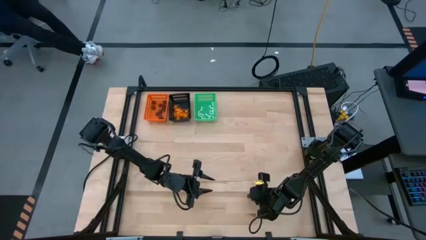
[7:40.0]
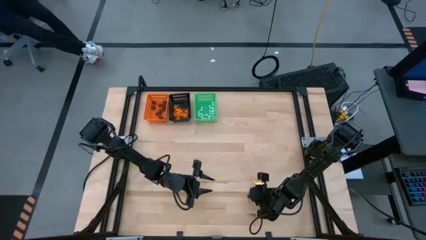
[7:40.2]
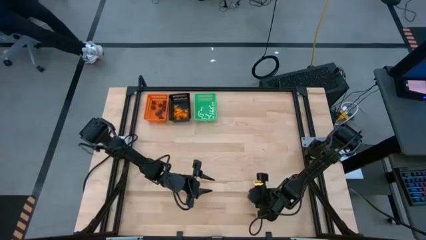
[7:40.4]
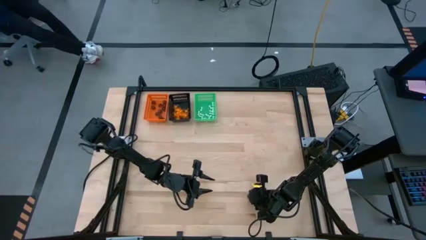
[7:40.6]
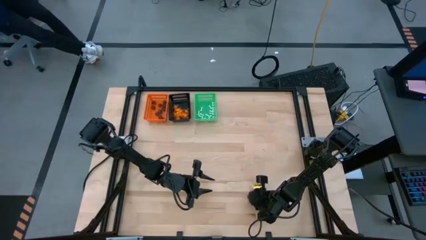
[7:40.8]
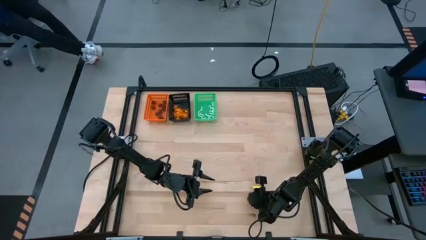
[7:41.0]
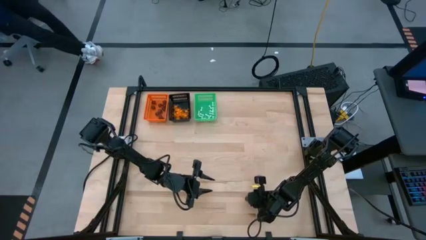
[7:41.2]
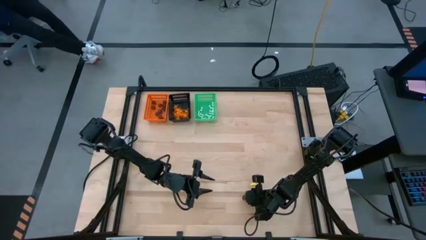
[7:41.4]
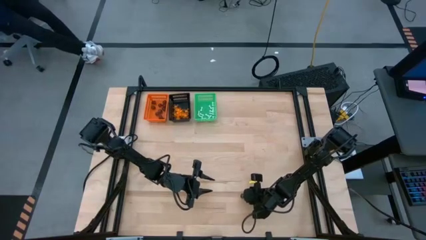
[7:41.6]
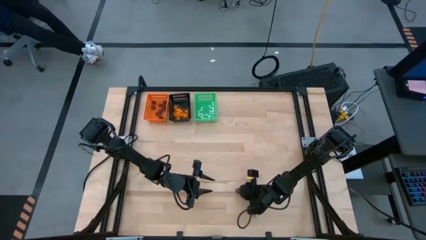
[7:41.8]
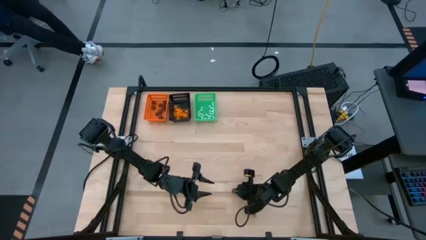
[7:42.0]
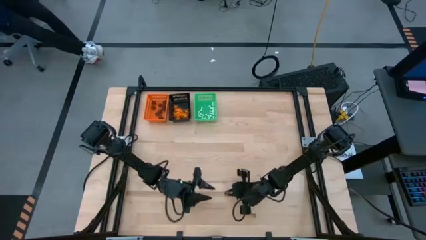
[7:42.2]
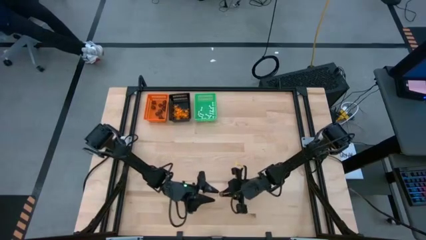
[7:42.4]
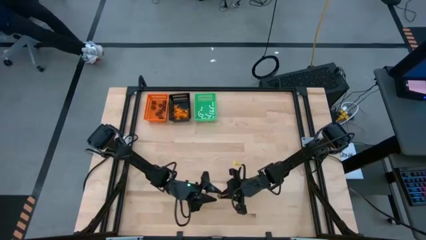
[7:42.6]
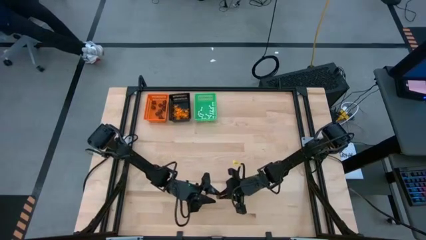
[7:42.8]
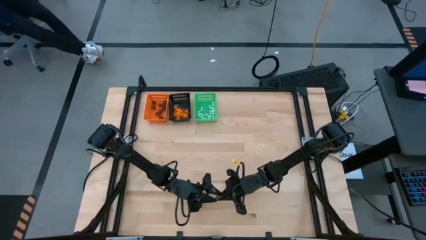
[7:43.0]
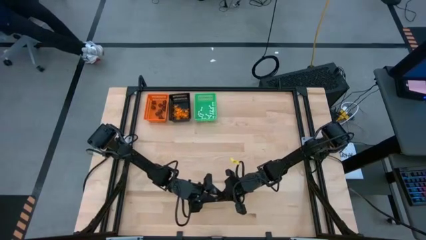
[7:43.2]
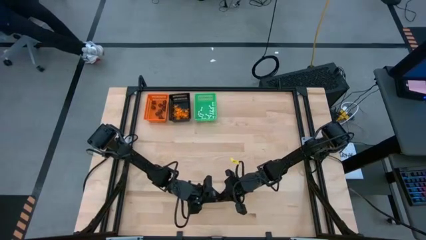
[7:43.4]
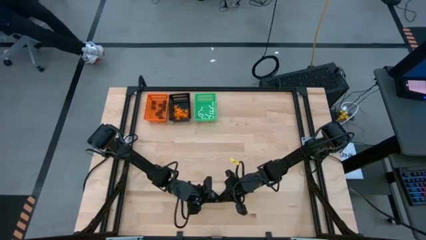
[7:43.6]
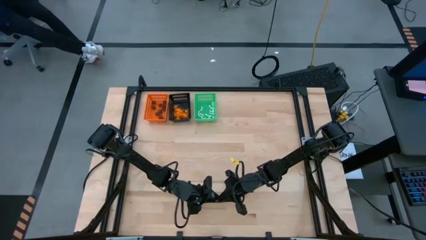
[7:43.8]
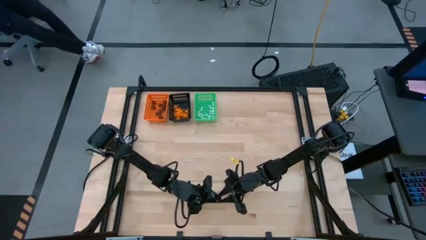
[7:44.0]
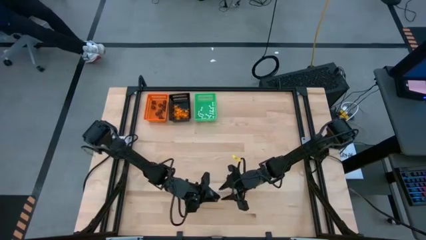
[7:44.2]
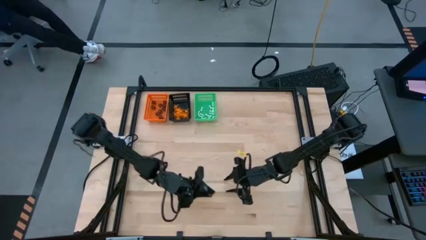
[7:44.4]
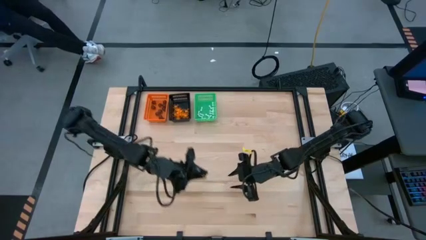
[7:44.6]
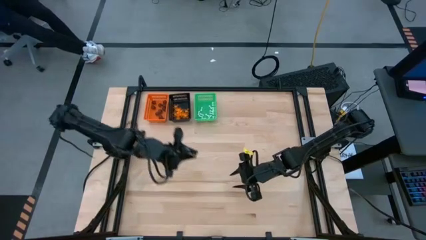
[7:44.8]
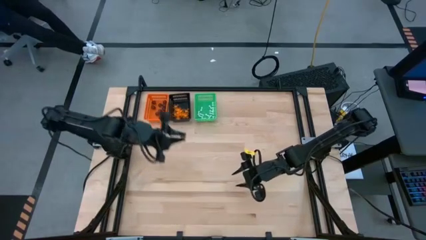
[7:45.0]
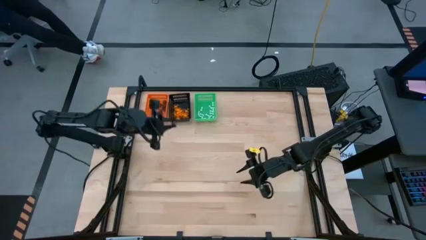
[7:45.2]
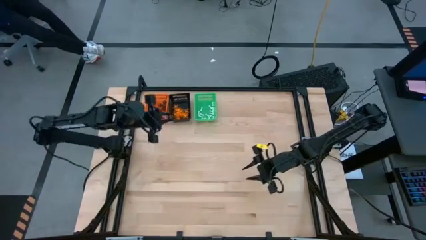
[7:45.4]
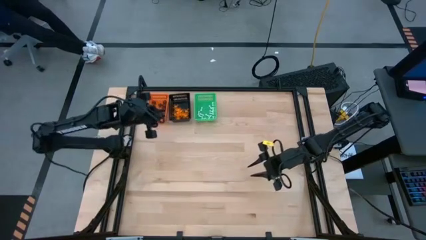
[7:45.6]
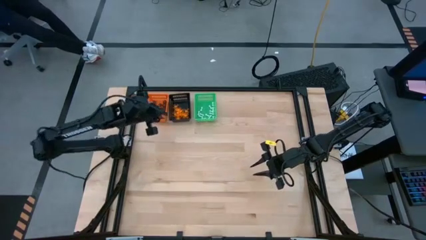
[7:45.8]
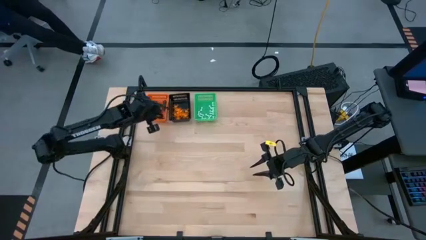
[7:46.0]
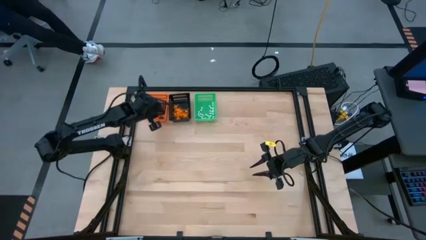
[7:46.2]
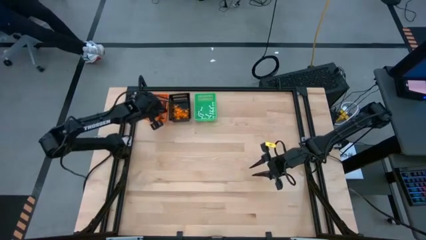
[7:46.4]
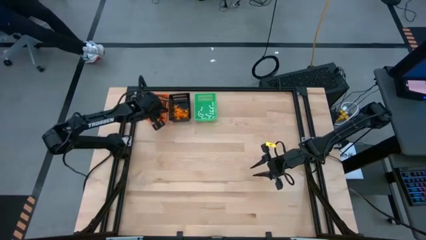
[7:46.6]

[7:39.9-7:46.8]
Task: Sort Halloween decoration
Put the black skull toy into the orange bin

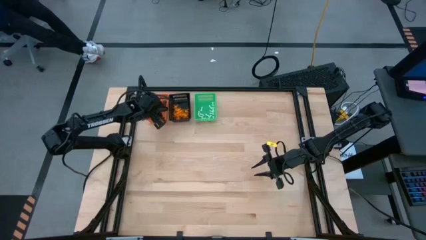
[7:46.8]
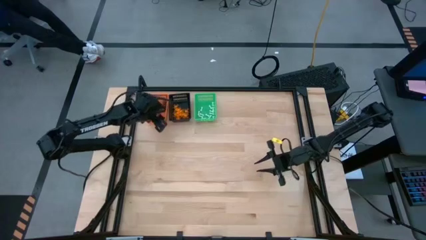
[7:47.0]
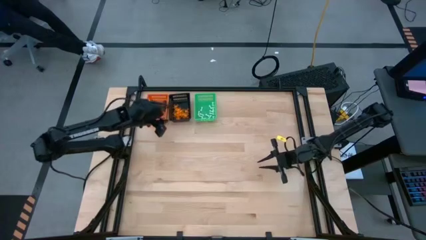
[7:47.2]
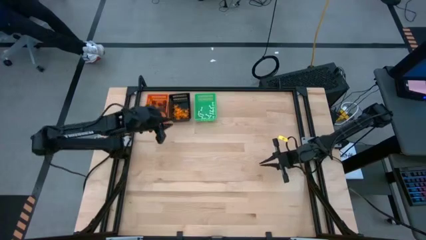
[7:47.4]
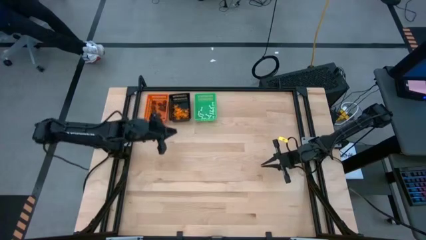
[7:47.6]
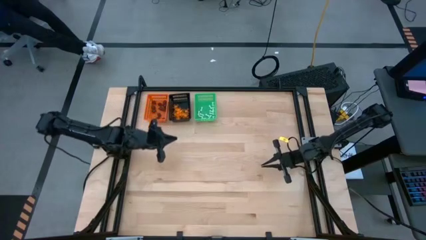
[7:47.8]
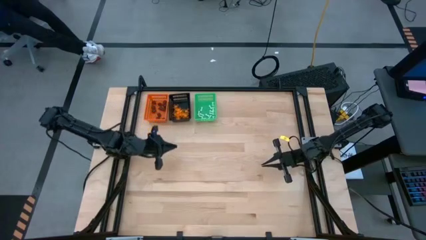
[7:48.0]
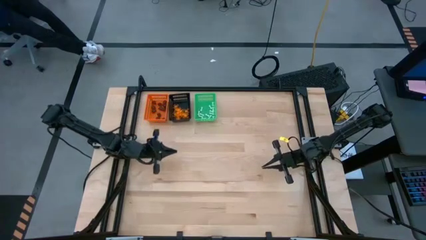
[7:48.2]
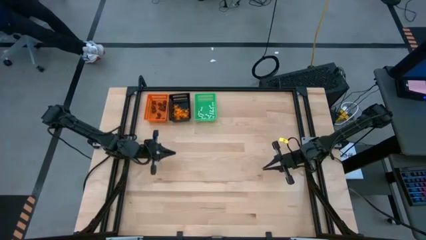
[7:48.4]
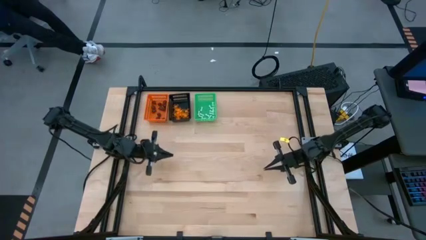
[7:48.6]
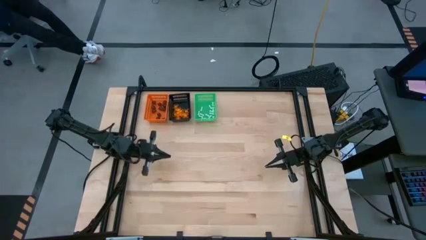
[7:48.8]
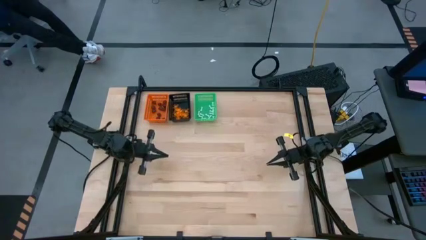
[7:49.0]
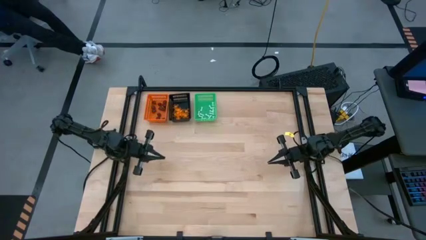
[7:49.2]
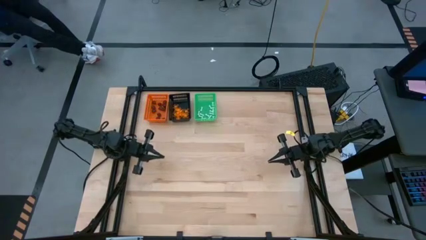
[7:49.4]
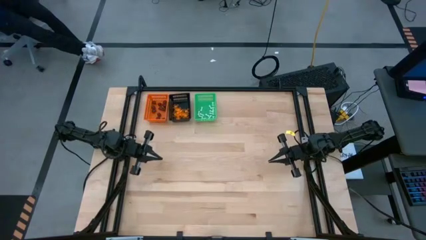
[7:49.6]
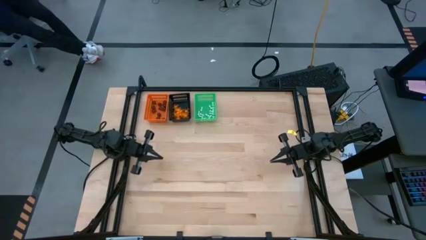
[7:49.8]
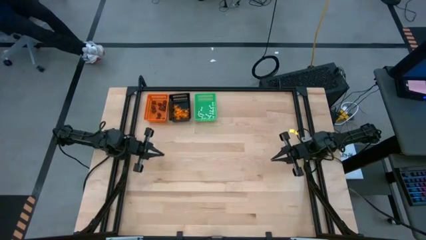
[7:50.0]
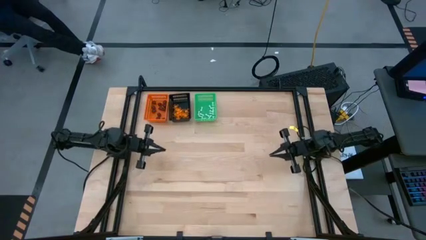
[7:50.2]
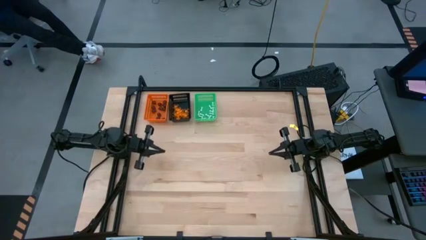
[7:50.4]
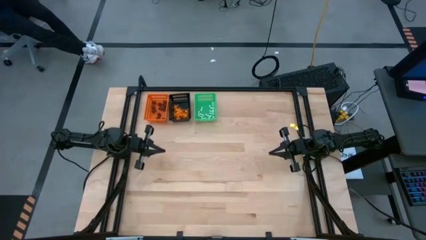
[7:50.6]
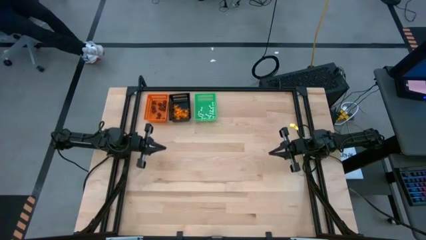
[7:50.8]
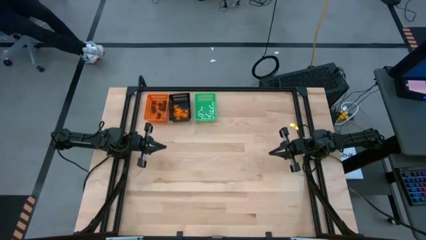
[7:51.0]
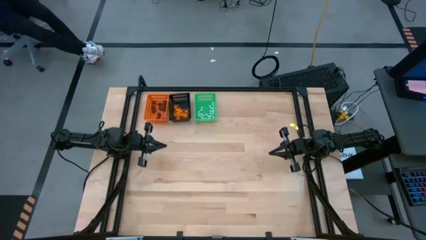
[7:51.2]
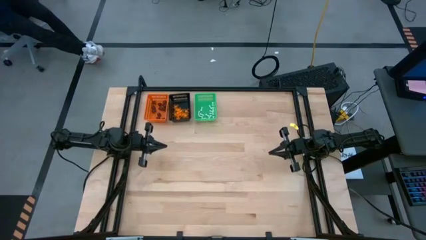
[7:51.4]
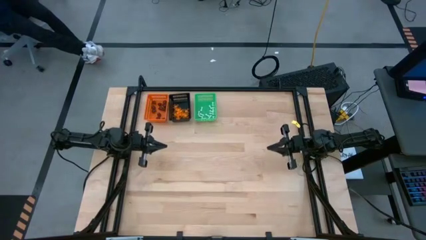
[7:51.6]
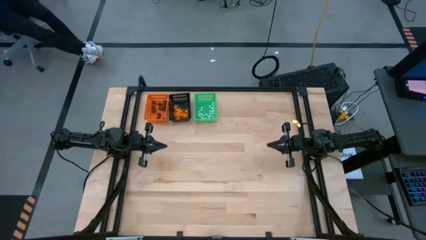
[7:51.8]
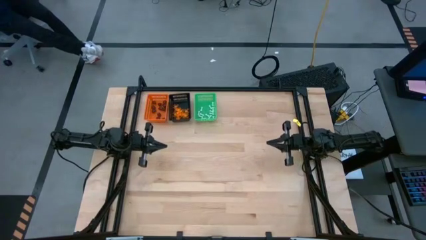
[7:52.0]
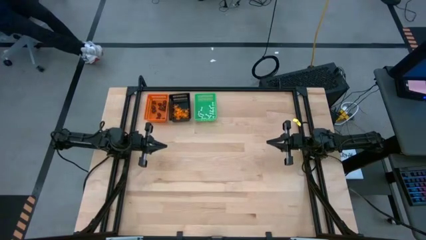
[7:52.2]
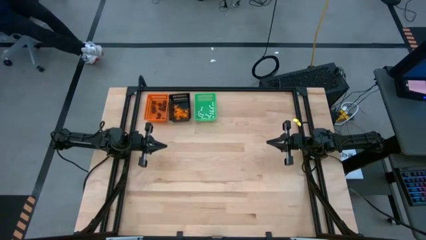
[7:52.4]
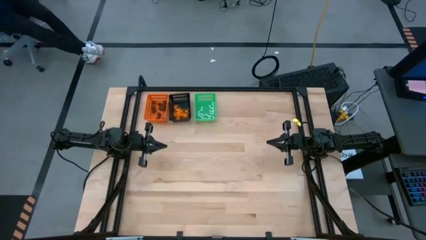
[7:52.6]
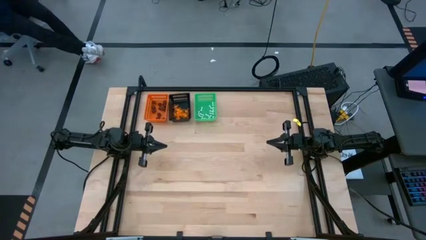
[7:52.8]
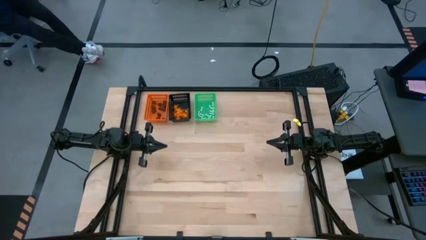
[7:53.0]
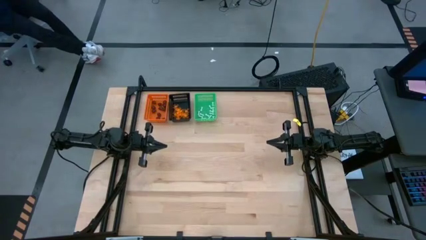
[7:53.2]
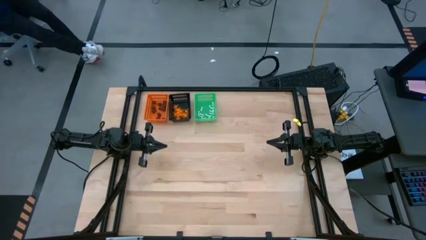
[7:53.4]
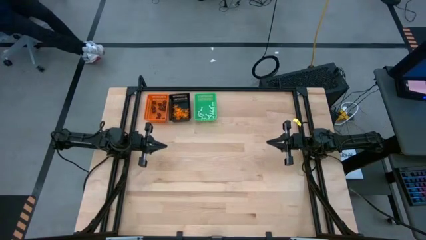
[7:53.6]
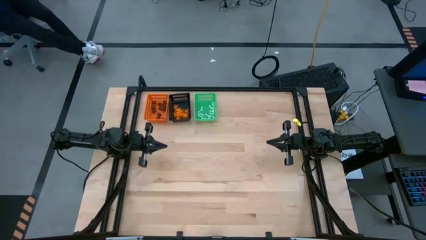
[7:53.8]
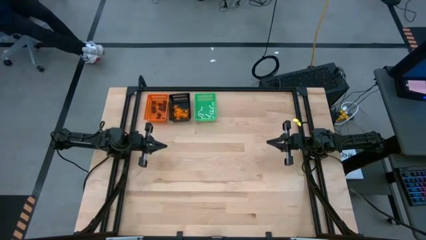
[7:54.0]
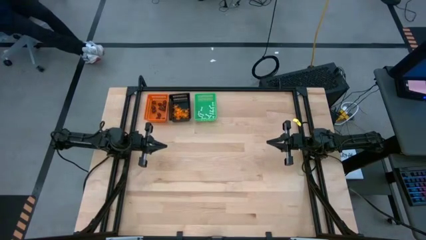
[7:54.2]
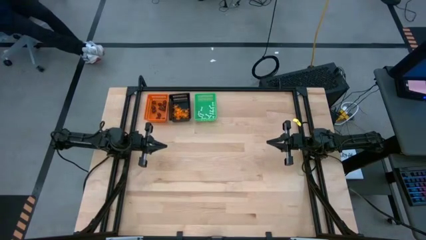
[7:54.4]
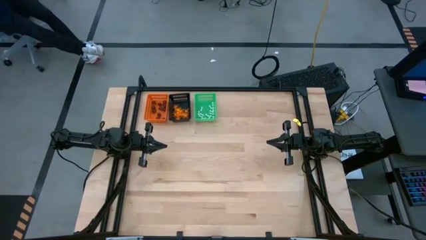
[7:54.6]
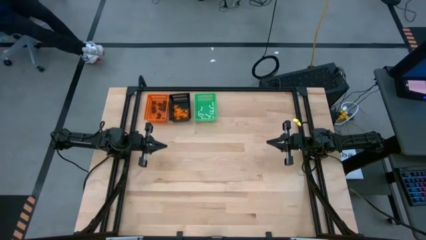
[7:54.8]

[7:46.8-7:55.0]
Return to Home Position
